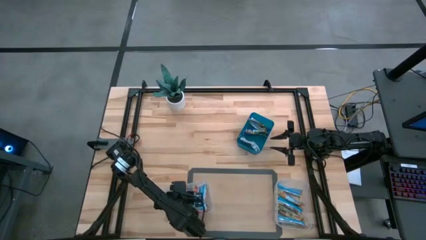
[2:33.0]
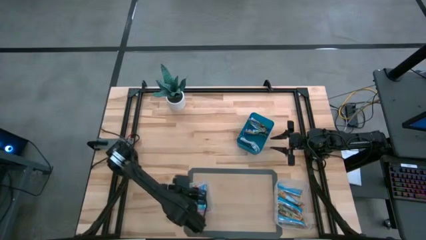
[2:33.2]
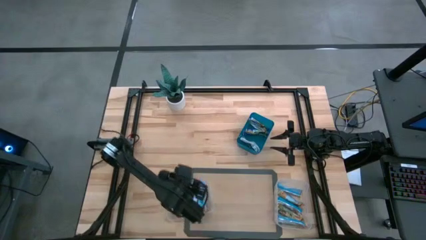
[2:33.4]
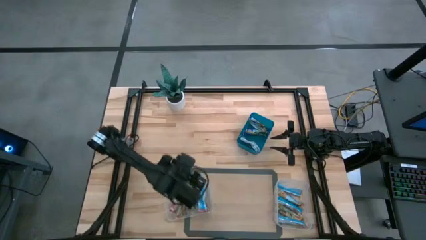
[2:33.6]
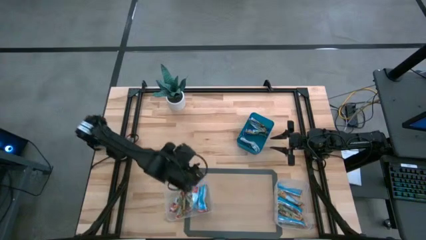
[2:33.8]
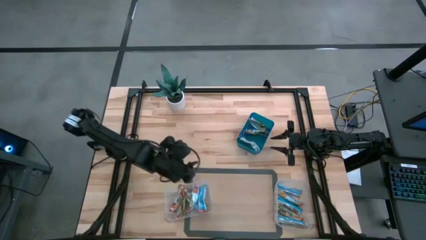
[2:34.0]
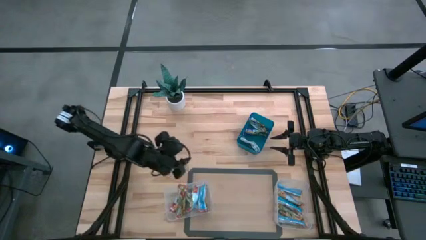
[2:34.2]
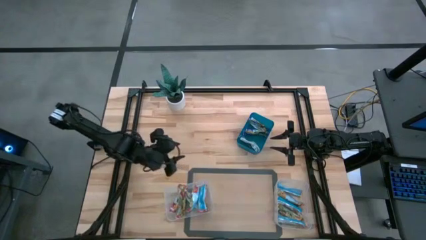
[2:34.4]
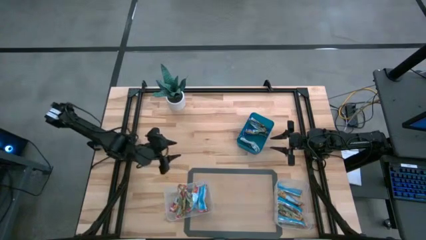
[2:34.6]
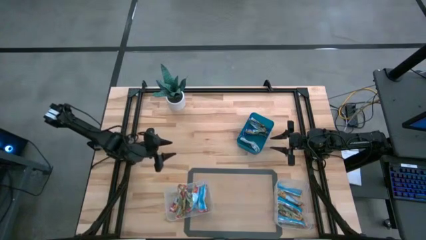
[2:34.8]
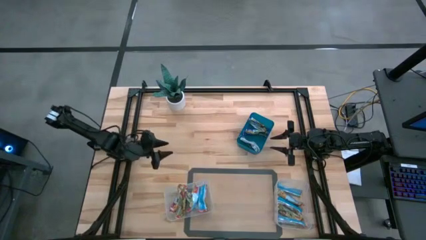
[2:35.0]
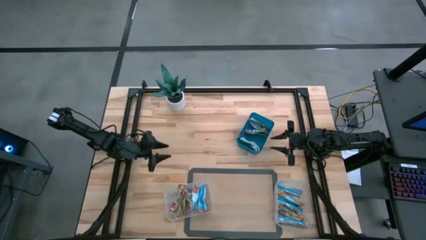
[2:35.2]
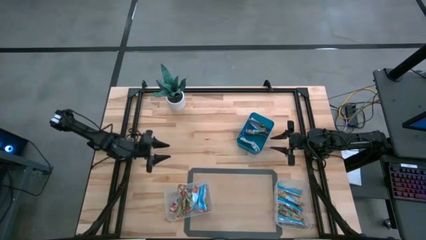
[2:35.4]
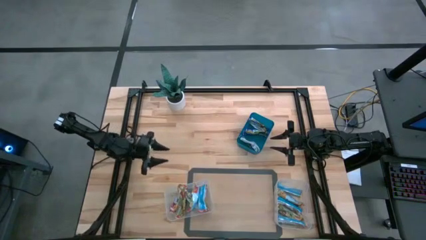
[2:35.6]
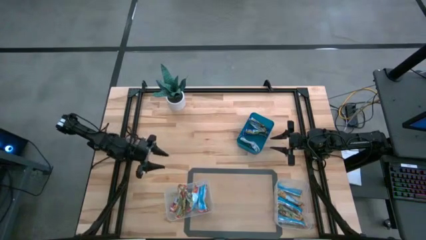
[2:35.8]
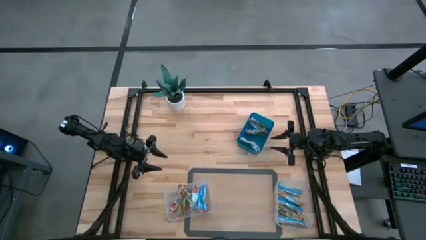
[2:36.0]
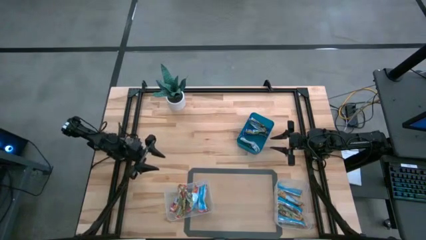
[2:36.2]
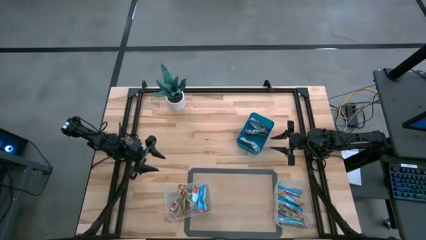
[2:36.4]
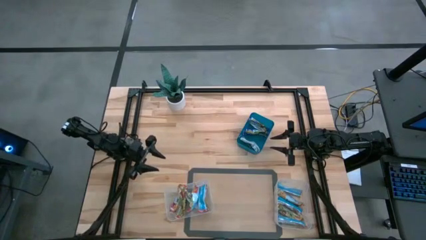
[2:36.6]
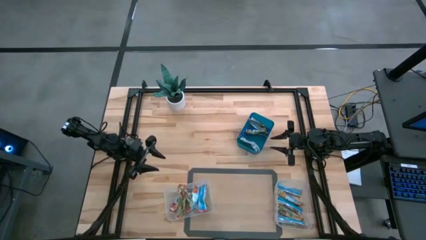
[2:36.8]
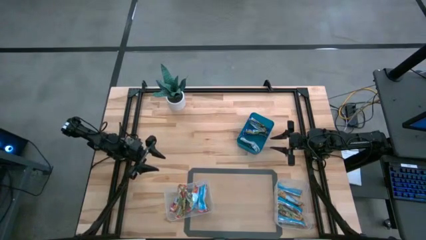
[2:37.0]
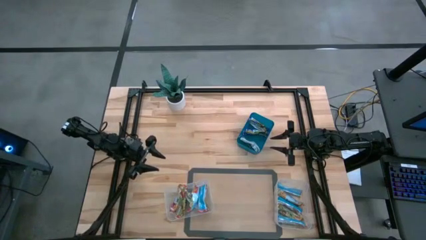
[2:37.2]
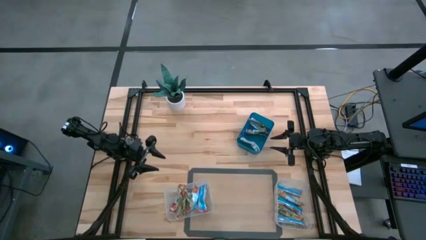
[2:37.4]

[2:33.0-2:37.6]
Task: Pick and place Granola Bars by type
Return to Home Position

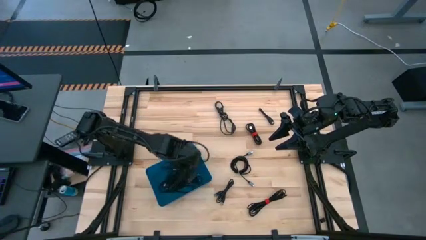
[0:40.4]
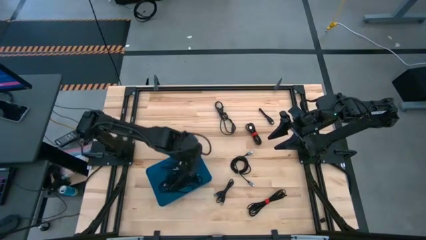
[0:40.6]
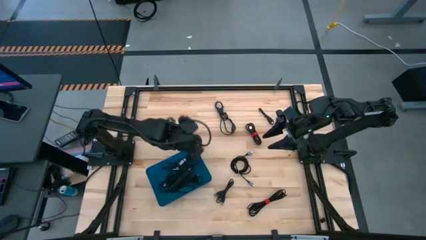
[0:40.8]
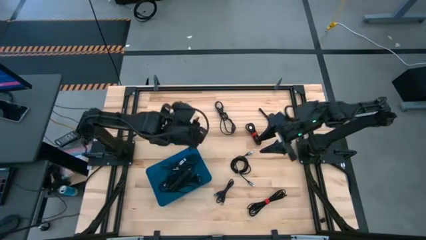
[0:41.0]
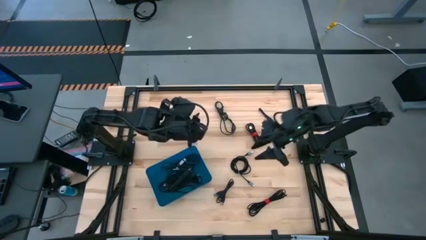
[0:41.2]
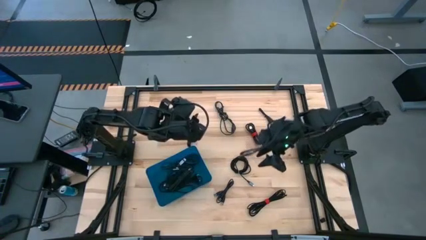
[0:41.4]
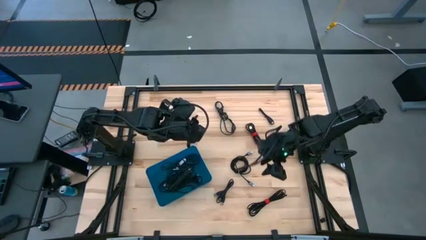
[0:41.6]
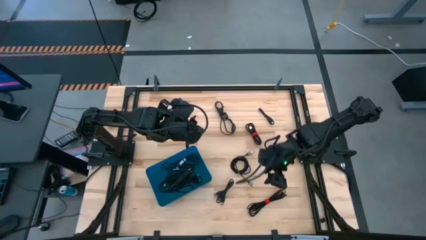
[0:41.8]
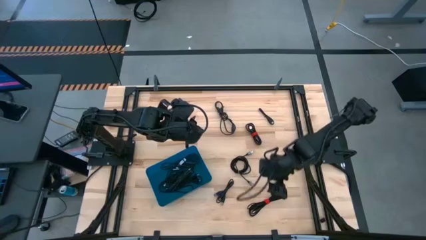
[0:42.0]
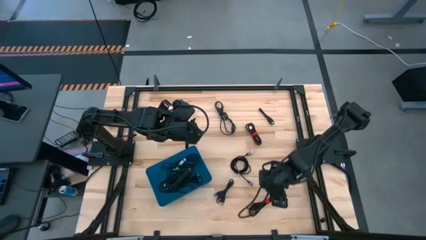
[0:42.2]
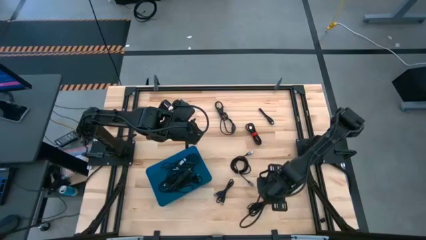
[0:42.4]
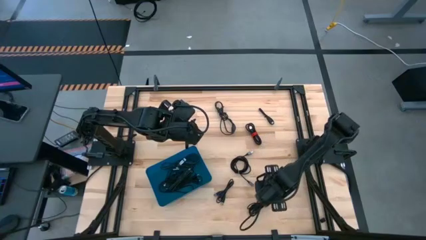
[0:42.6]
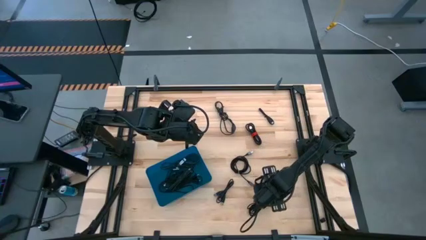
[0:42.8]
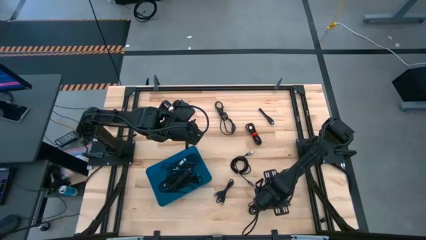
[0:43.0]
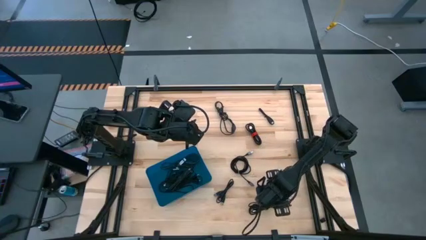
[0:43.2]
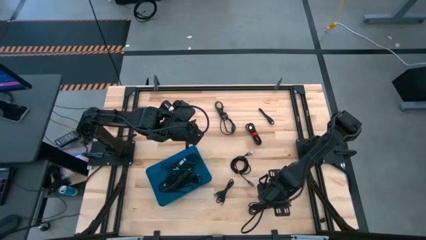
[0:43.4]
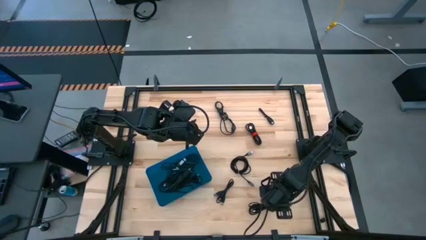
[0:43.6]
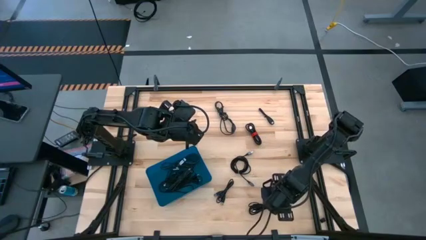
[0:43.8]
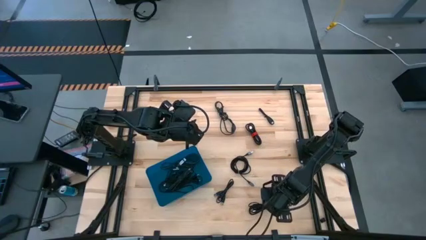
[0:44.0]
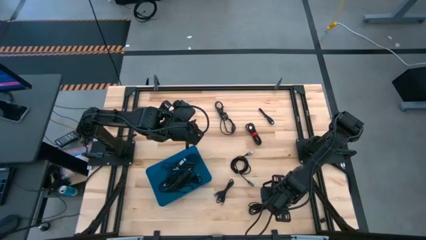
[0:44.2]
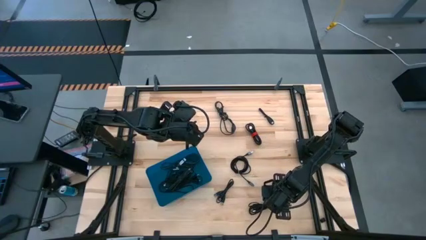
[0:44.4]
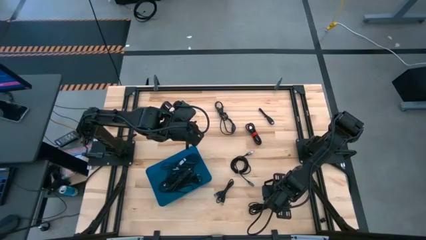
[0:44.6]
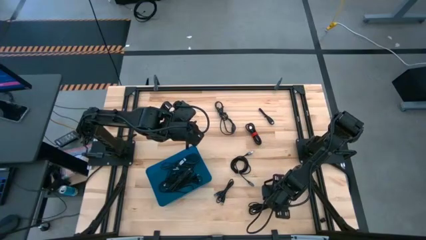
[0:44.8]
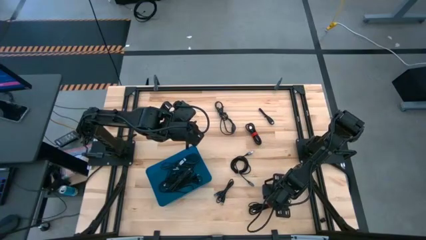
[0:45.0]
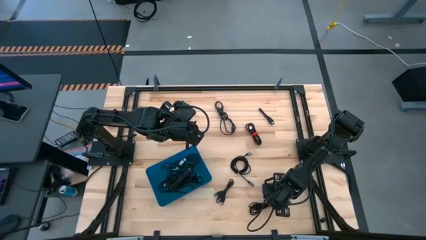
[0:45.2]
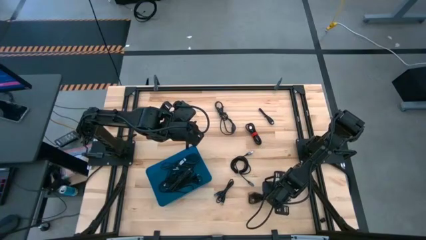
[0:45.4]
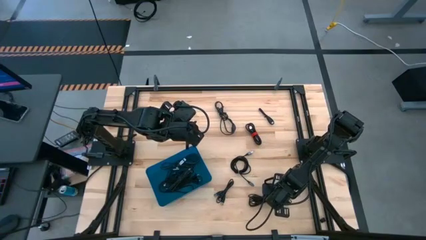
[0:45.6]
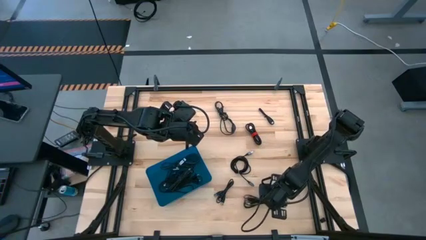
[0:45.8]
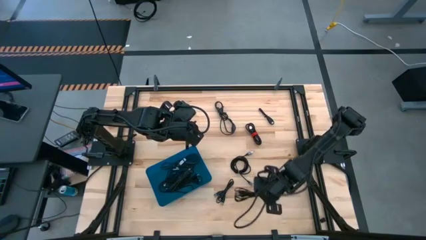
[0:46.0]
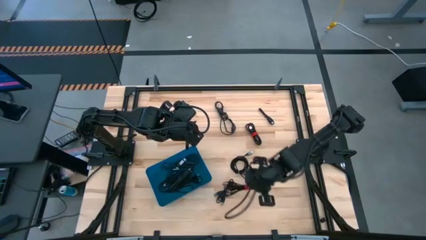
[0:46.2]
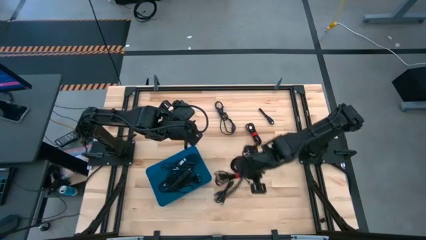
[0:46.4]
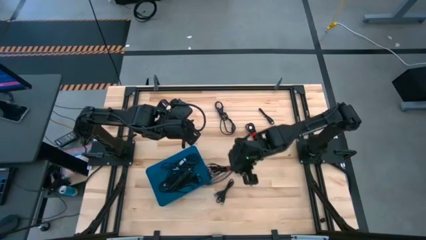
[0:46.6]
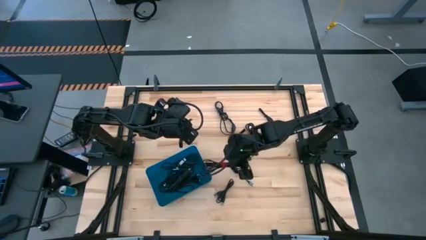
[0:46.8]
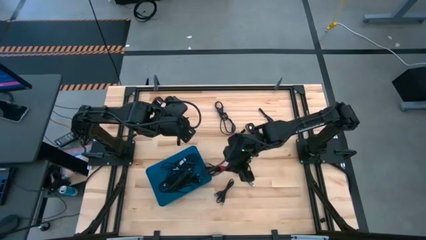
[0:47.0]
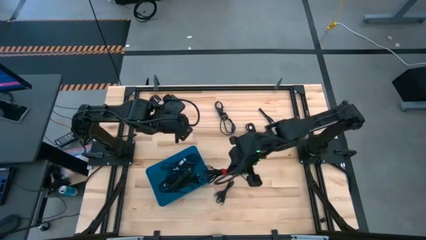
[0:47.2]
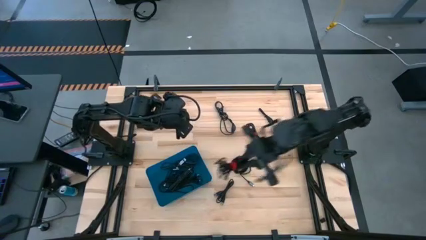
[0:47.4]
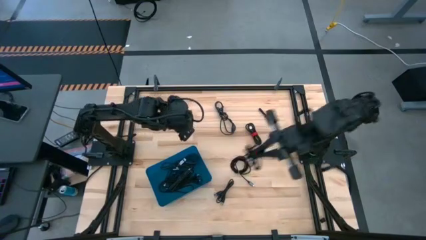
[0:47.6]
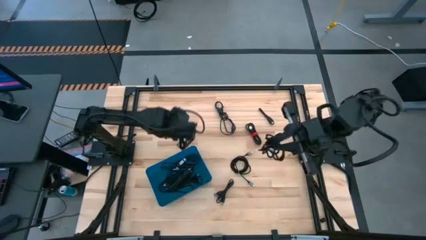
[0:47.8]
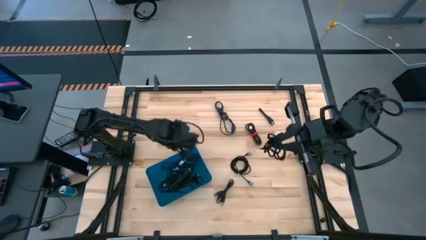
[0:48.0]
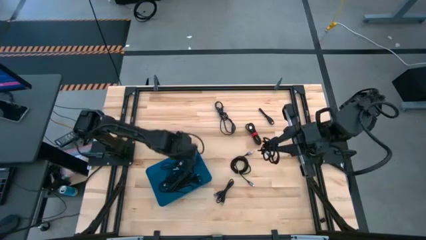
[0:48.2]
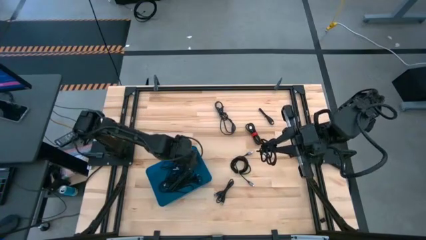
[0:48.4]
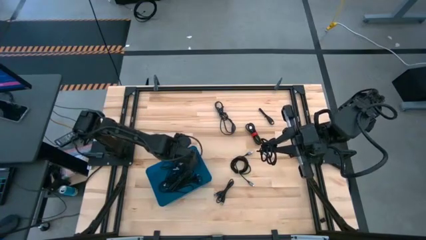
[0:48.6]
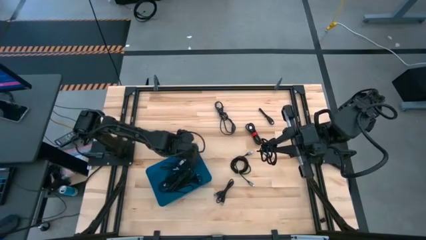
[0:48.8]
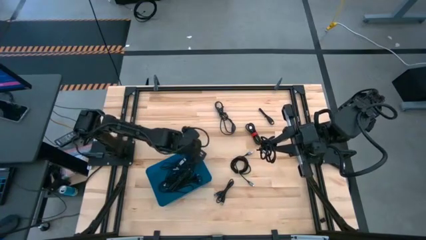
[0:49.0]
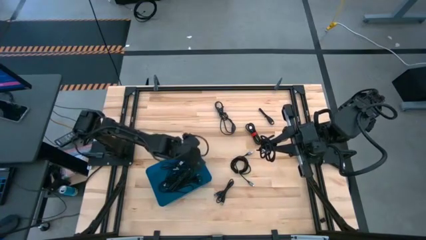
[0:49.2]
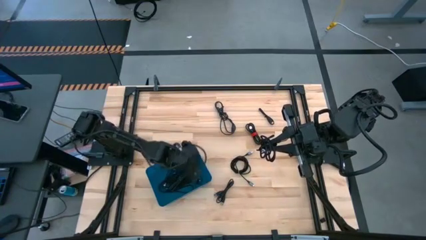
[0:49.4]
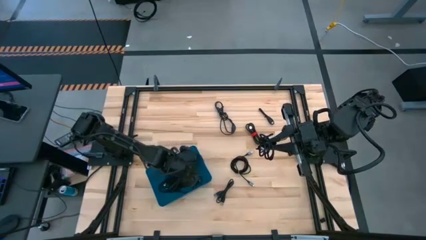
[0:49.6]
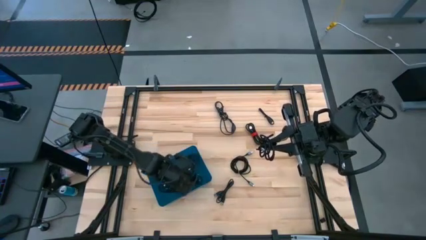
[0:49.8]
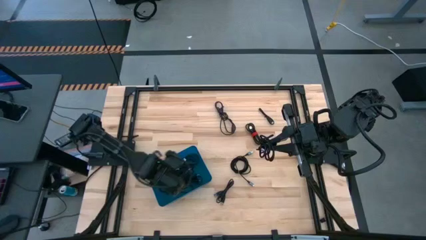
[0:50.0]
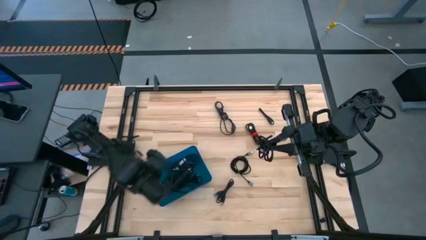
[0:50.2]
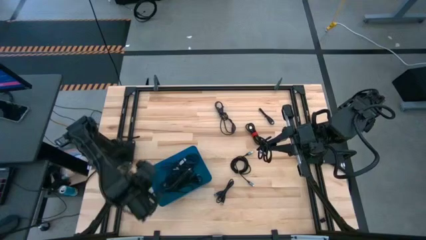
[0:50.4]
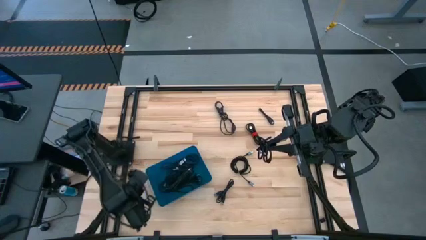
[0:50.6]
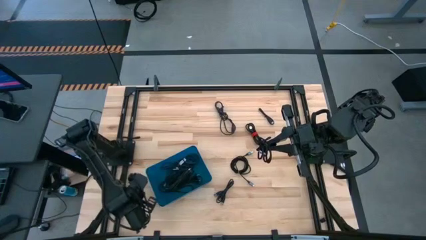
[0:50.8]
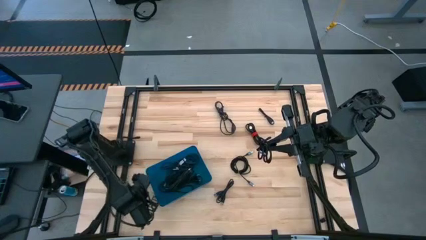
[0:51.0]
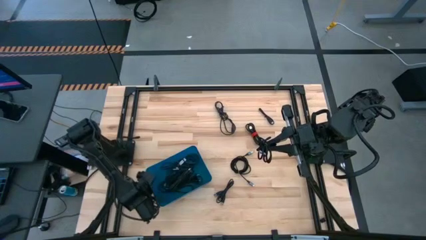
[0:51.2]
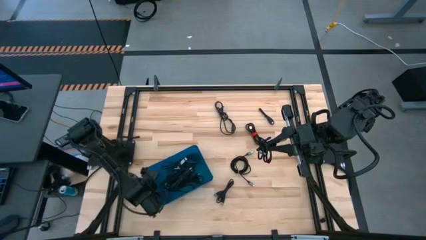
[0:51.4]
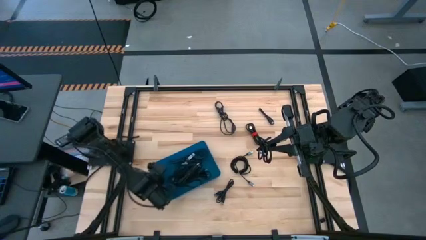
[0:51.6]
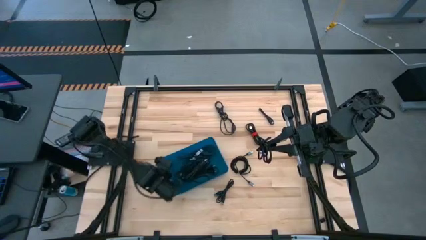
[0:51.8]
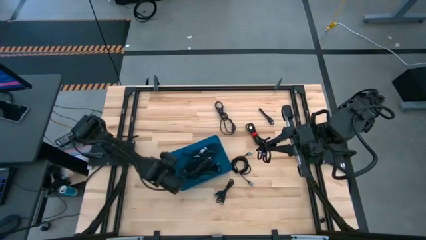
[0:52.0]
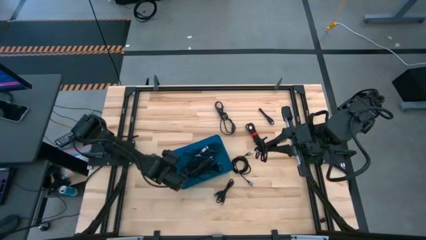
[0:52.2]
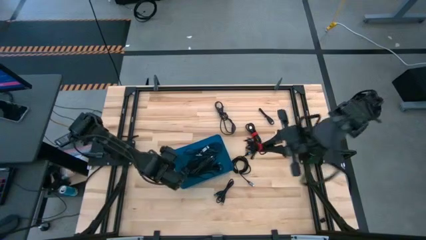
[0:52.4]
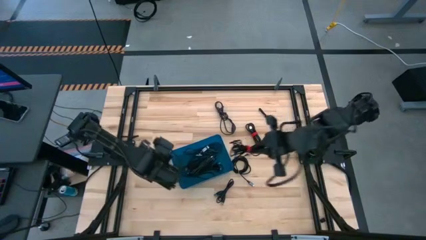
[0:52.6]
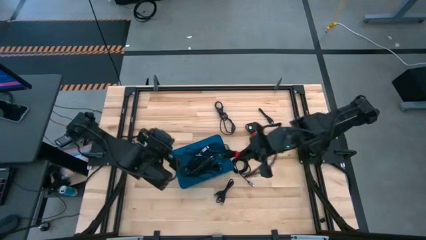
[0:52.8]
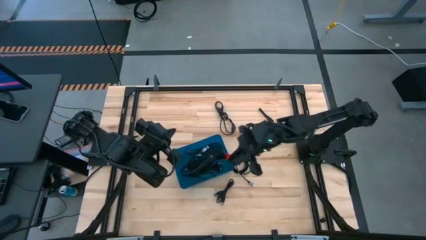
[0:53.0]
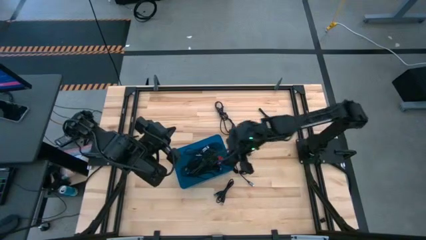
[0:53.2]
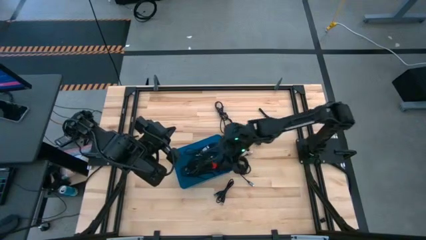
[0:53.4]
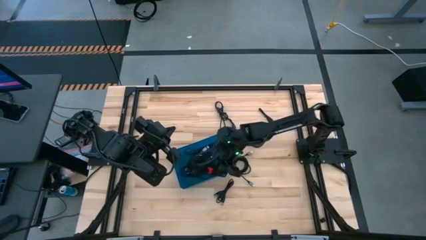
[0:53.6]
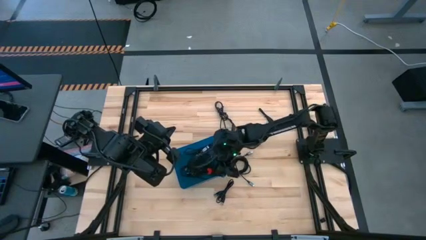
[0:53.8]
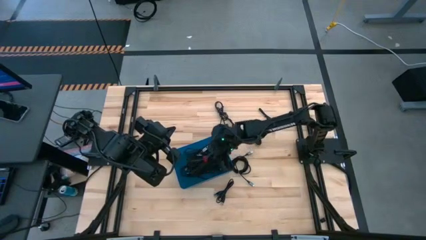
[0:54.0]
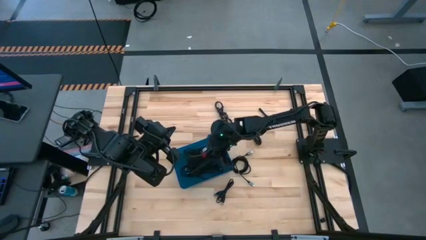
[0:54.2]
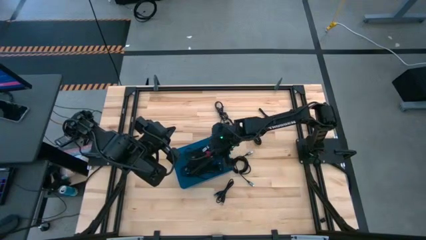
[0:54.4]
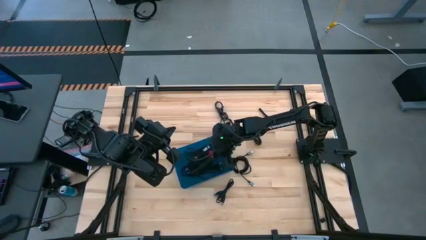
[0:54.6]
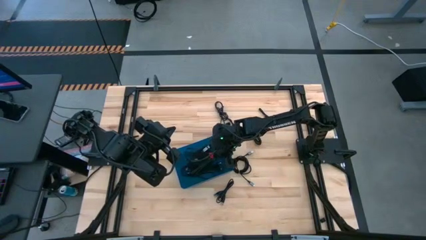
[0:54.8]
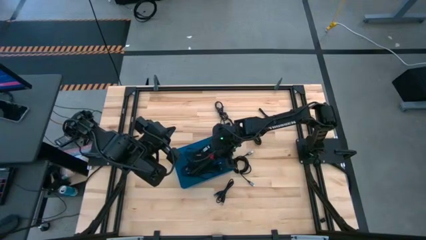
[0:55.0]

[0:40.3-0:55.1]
Task: Pick and place USB-C Cables
Put the black charger cable into the blue bin
